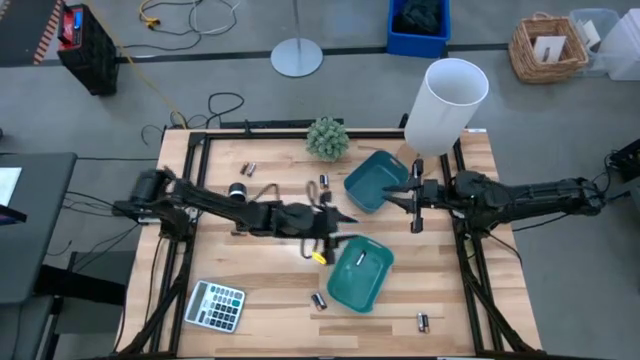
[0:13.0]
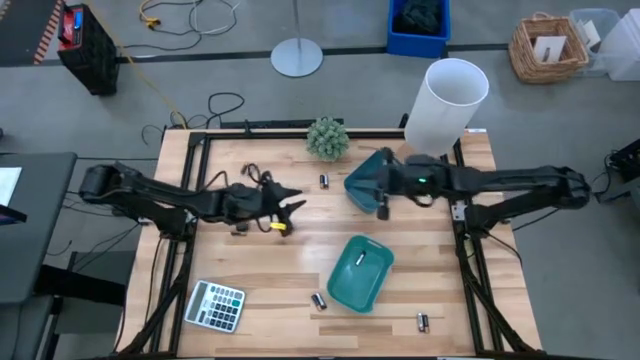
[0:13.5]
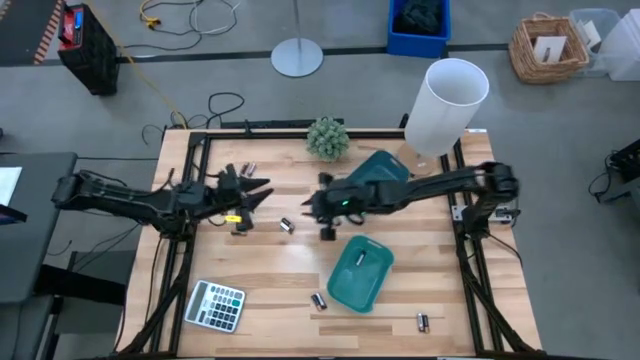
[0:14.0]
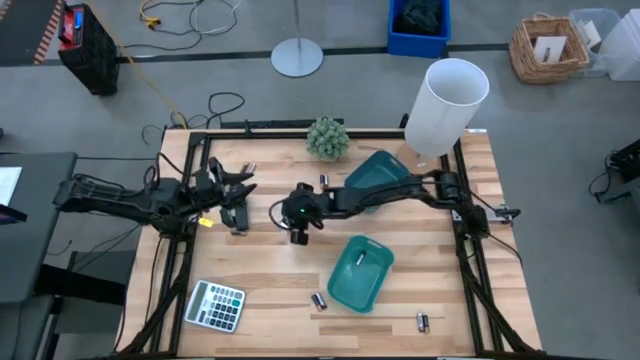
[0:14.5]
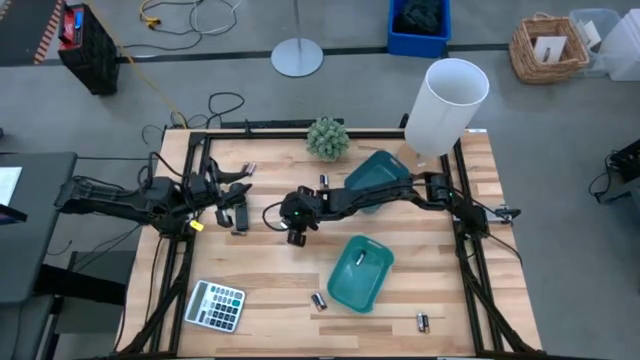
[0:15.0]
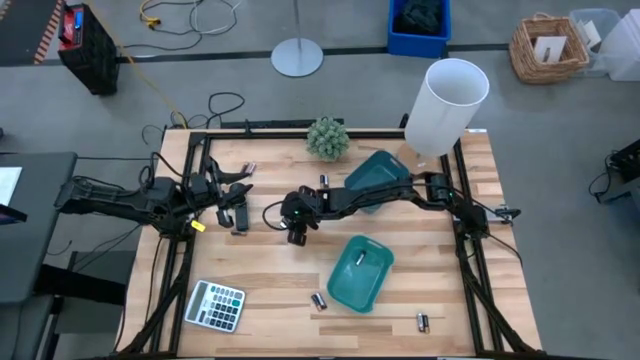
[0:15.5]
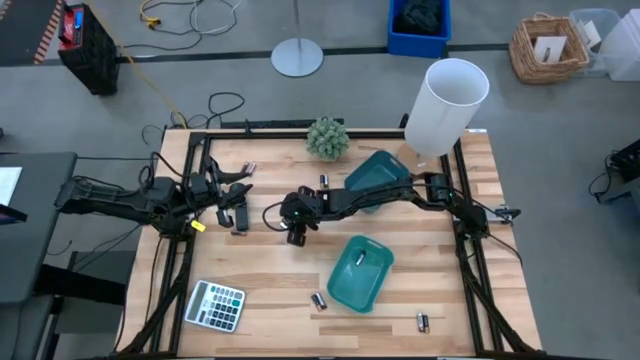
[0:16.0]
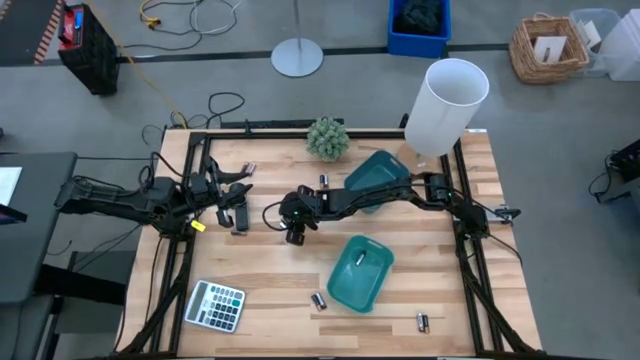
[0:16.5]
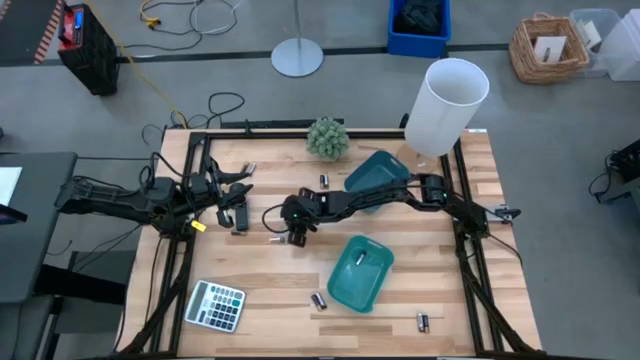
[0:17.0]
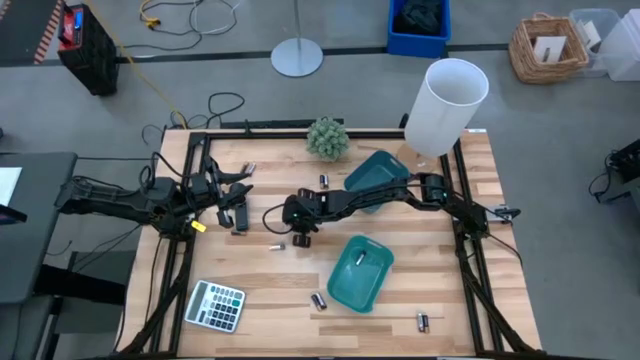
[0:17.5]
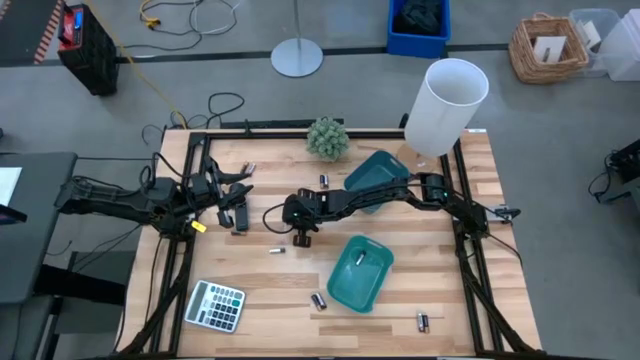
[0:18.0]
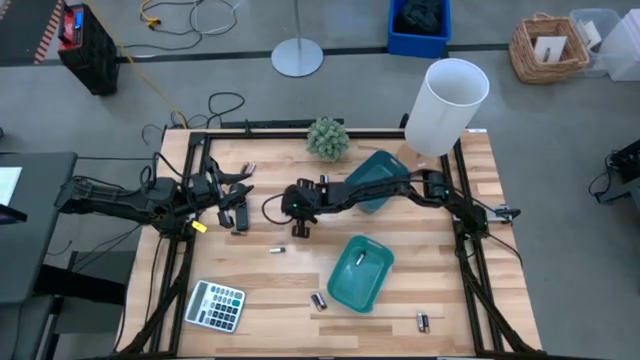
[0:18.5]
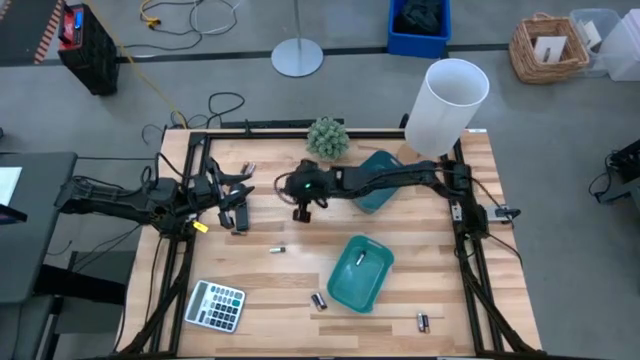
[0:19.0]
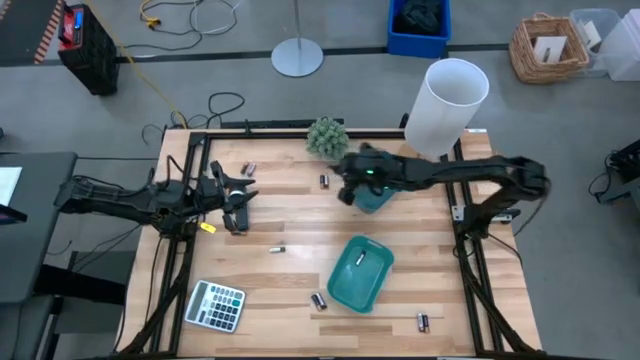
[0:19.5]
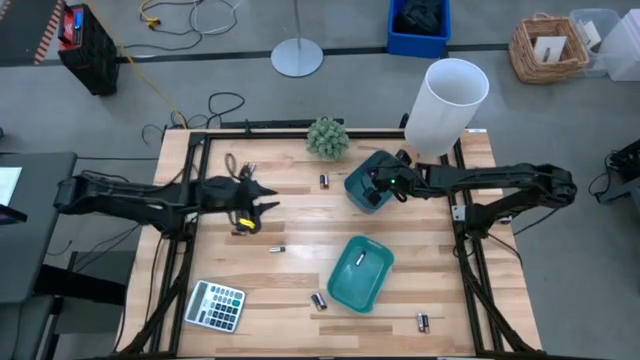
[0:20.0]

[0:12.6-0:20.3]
Task: Sort batteries
Put the black battery into the blue bin

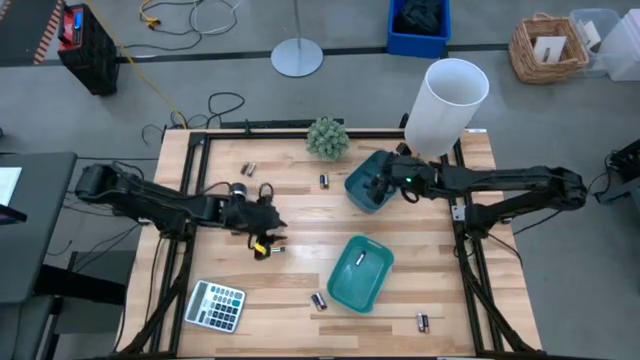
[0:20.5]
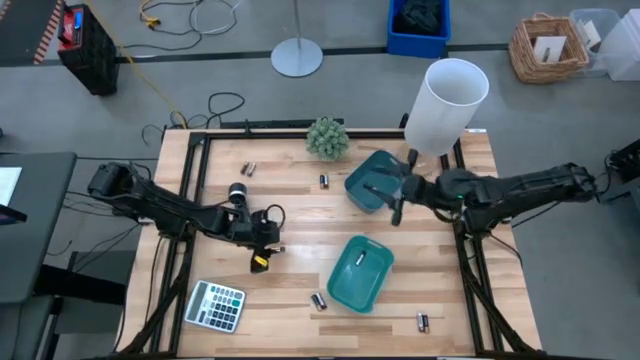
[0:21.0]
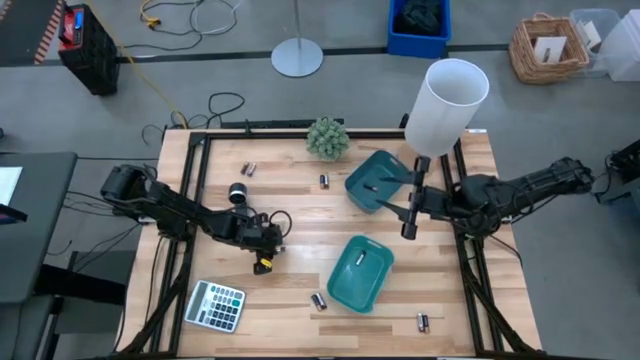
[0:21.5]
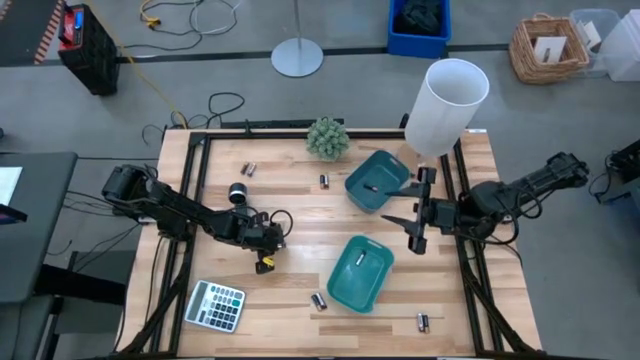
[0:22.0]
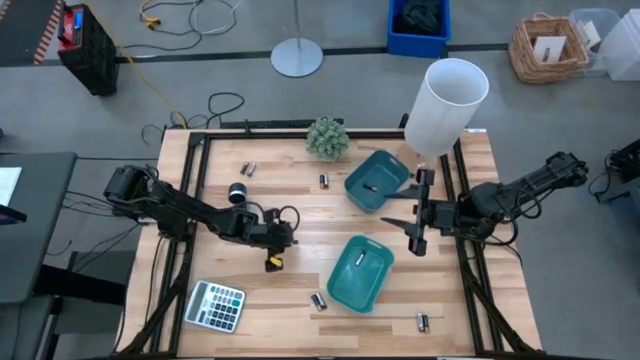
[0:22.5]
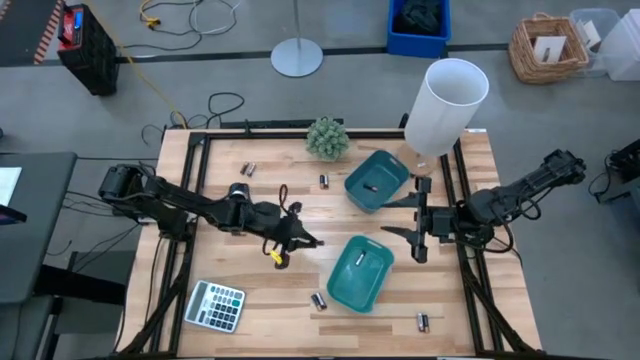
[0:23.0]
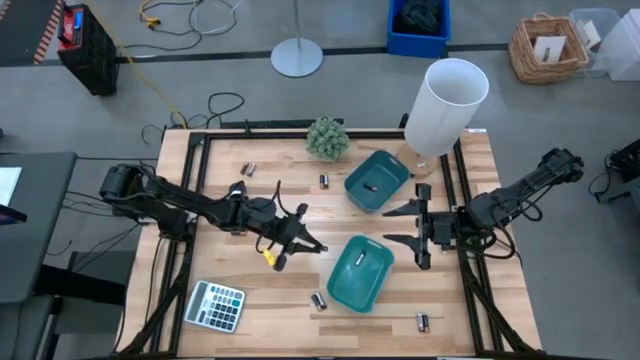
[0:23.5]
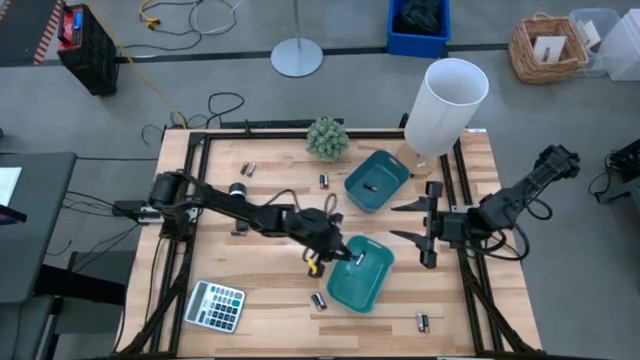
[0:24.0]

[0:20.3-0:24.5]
Put the silver battery into the green bin

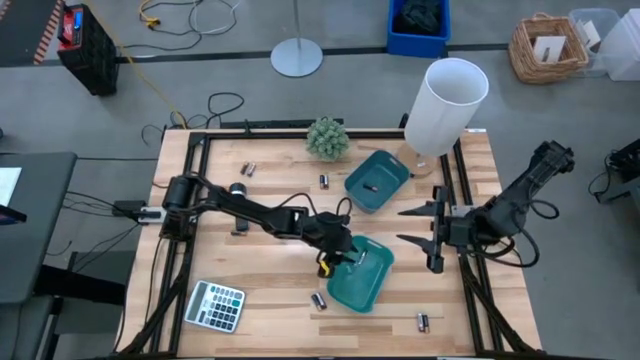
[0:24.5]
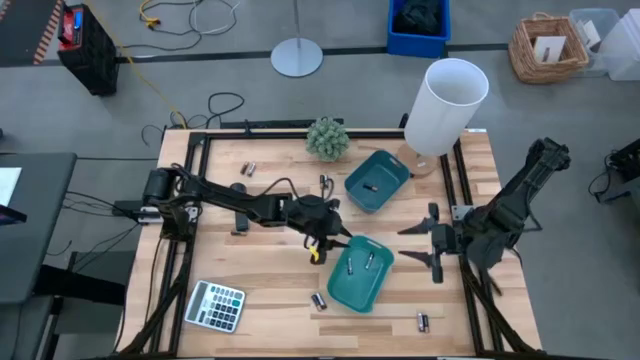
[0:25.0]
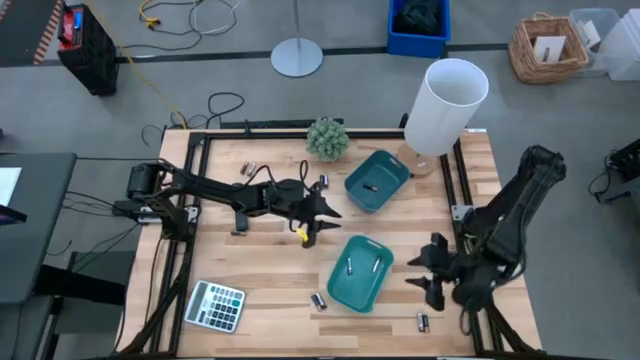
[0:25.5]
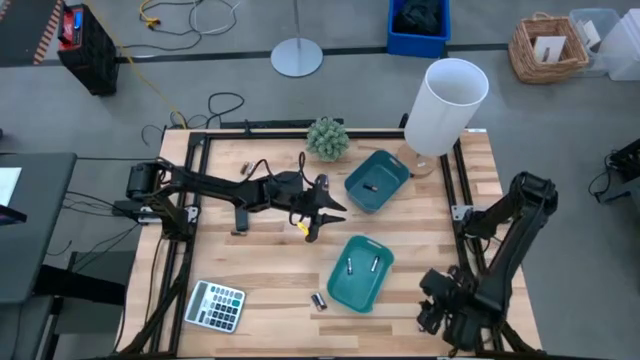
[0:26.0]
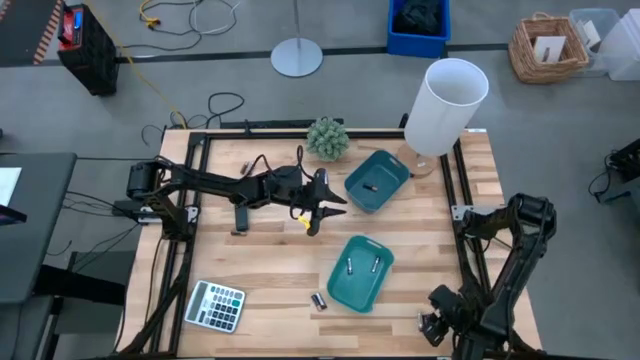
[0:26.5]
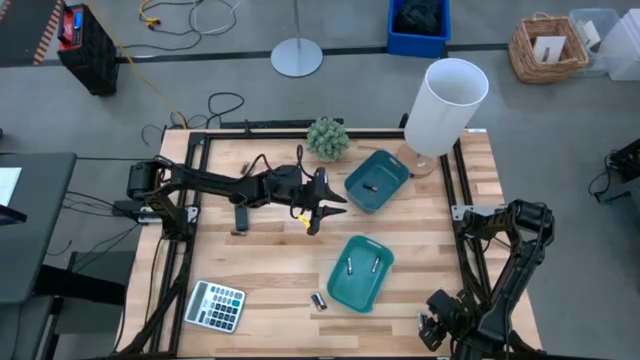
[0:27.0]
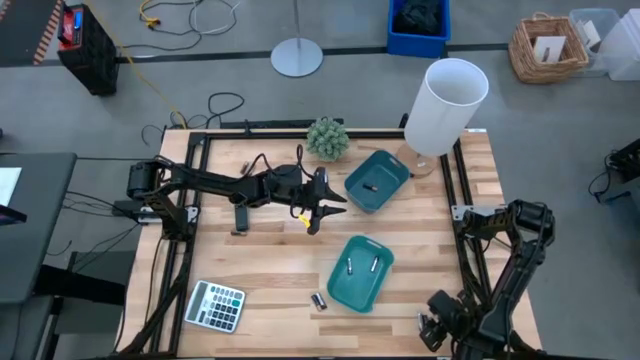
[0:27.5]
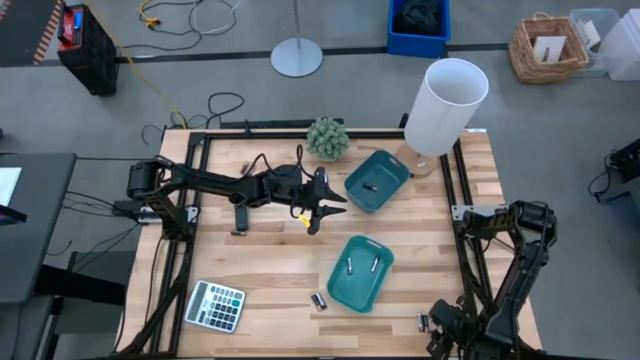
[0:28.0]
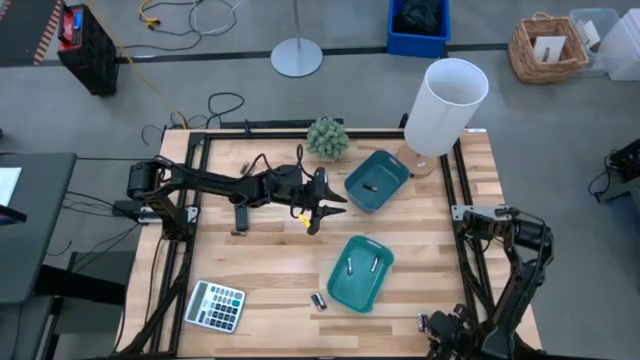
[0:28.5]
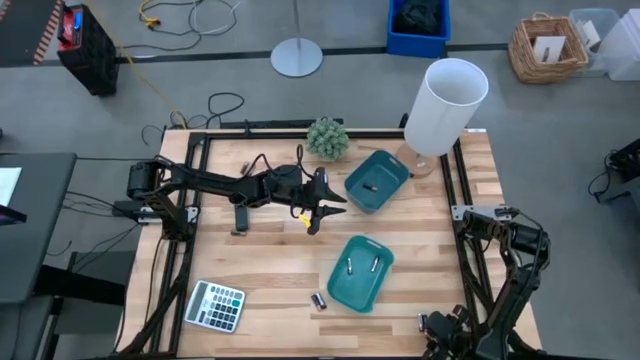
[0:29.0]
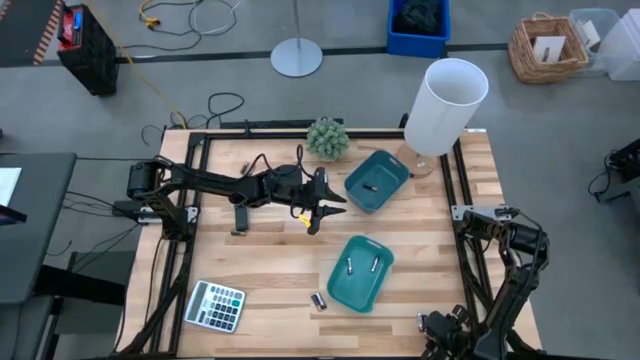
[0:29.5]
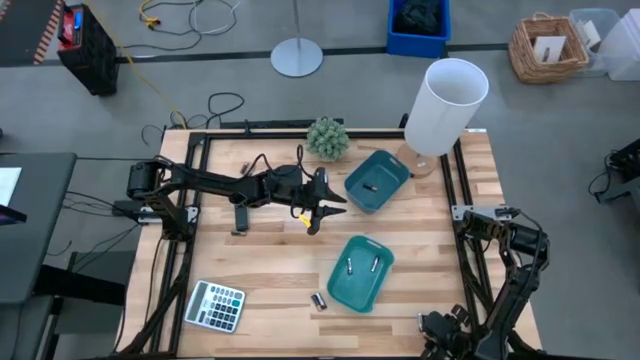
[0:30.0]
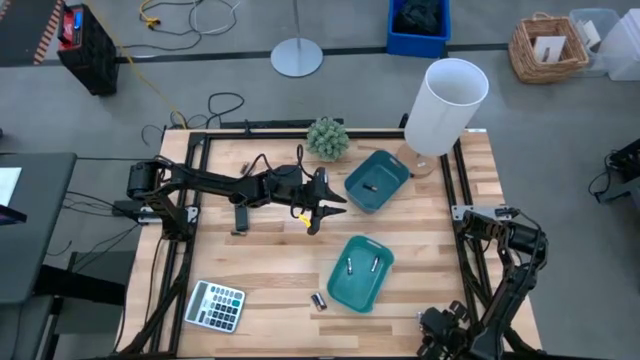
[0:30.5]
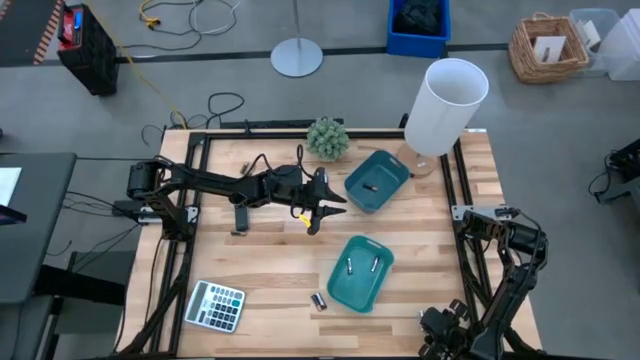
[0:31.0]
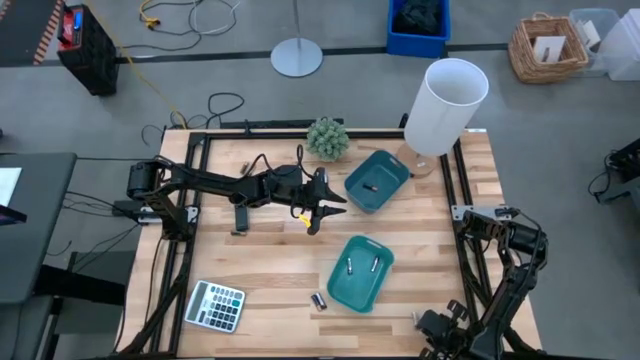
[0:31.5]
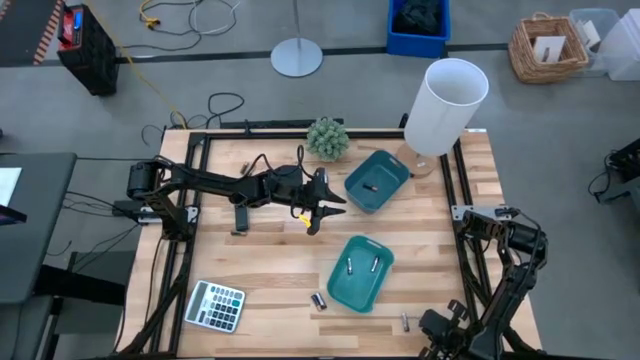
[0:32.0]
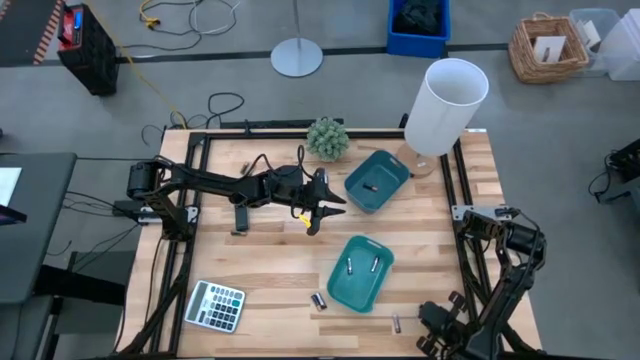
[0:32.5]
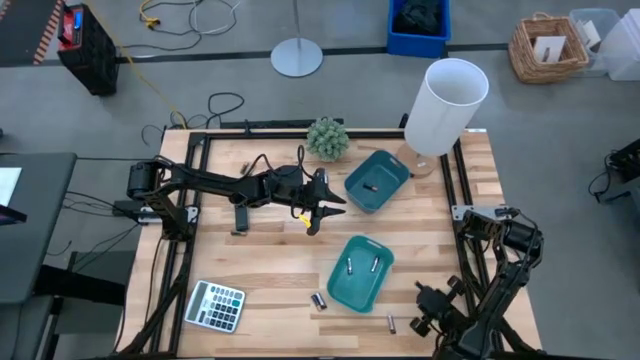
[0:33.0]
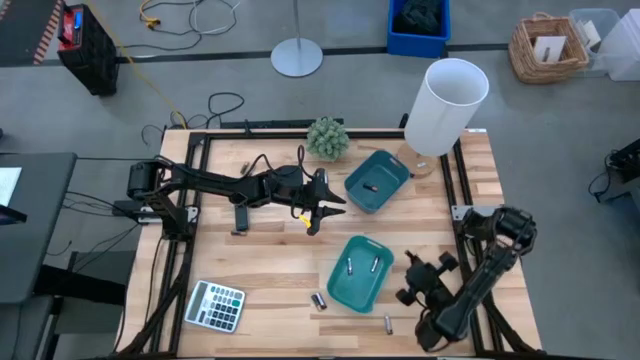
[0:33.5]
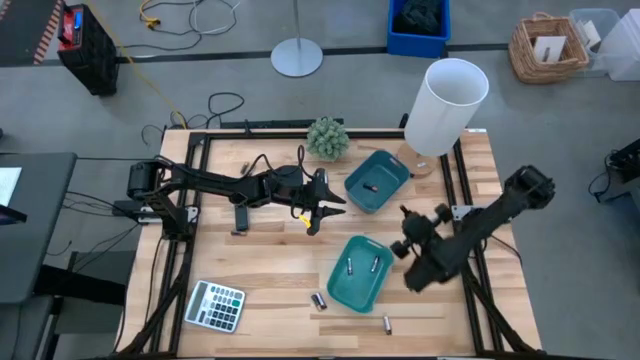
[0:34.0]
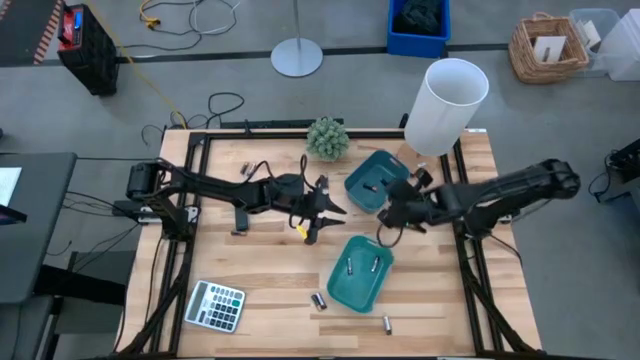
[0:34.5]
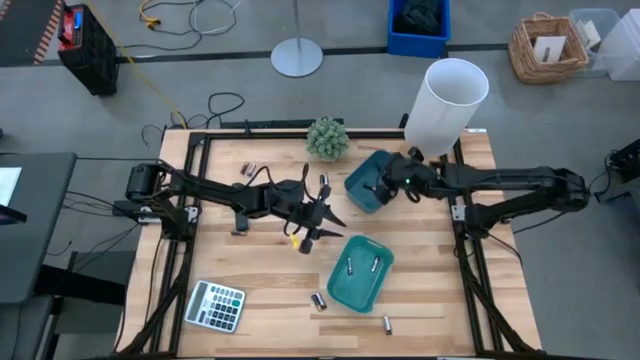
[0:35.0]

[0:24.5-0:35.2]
Put the black battery into the blue bin
